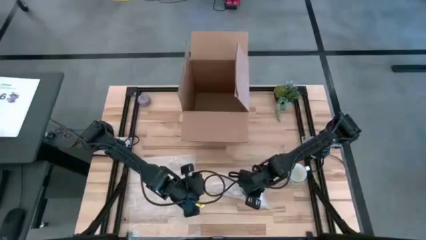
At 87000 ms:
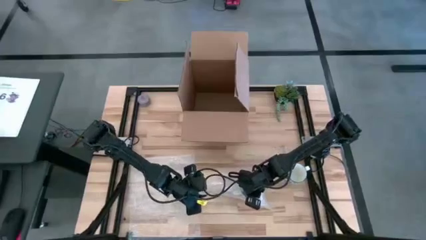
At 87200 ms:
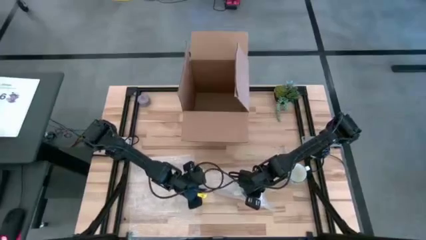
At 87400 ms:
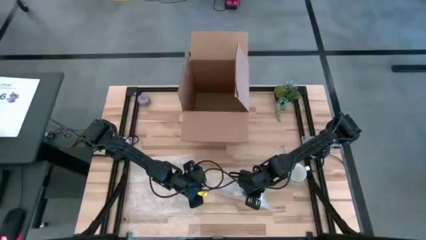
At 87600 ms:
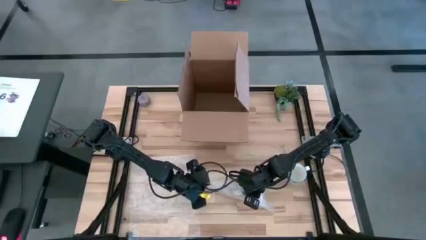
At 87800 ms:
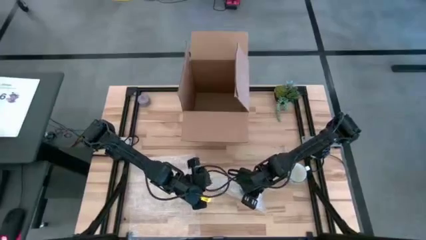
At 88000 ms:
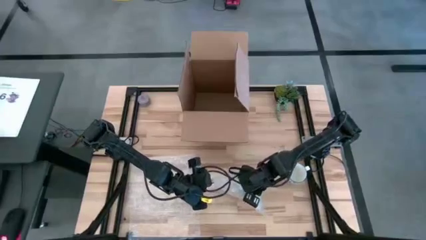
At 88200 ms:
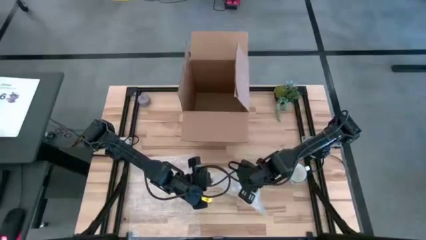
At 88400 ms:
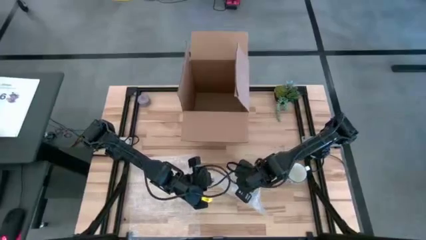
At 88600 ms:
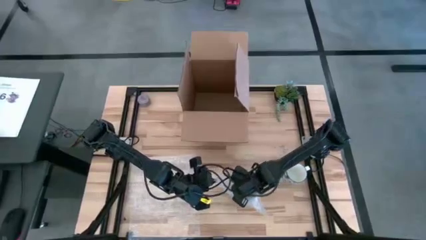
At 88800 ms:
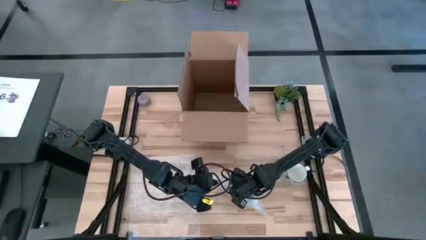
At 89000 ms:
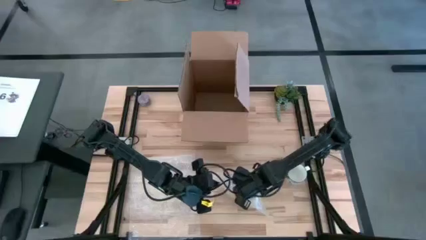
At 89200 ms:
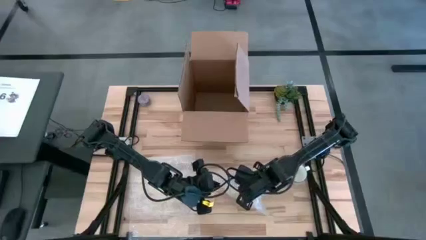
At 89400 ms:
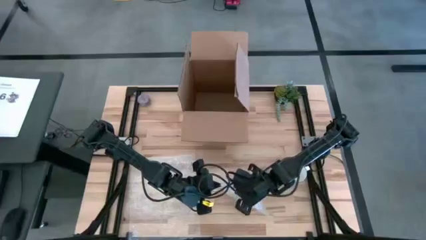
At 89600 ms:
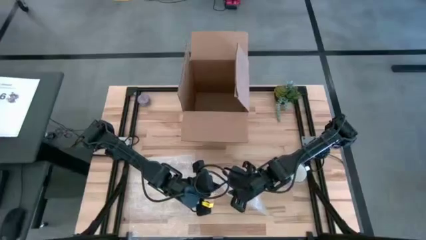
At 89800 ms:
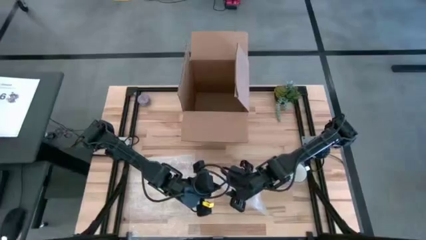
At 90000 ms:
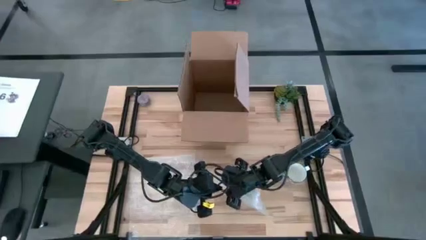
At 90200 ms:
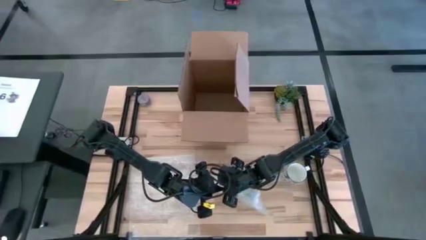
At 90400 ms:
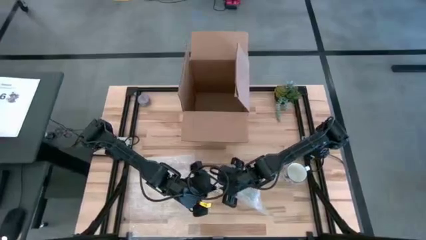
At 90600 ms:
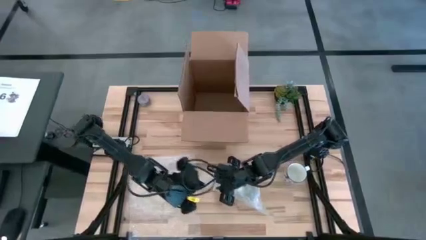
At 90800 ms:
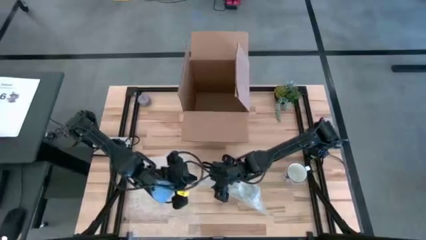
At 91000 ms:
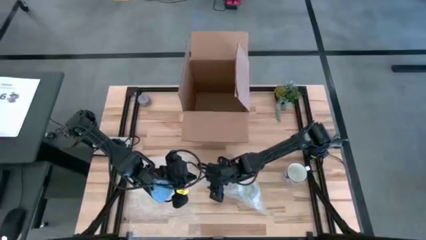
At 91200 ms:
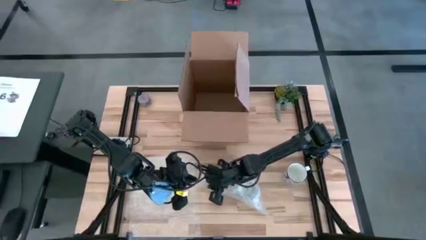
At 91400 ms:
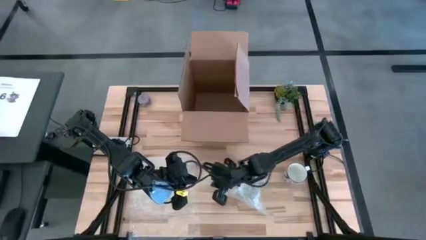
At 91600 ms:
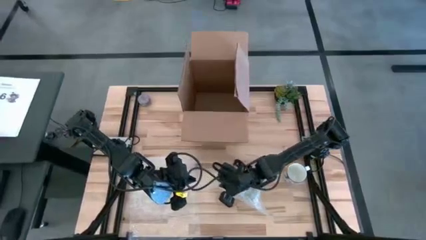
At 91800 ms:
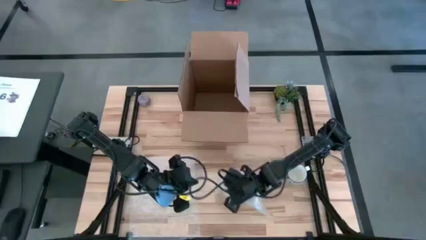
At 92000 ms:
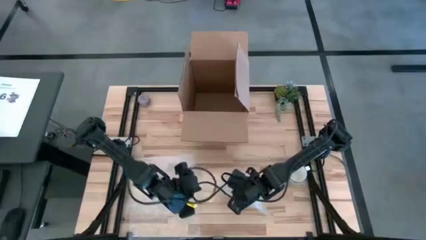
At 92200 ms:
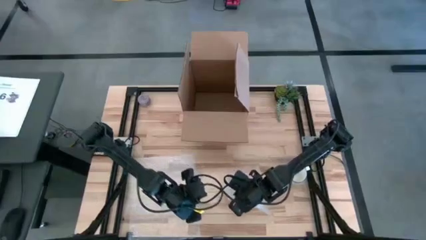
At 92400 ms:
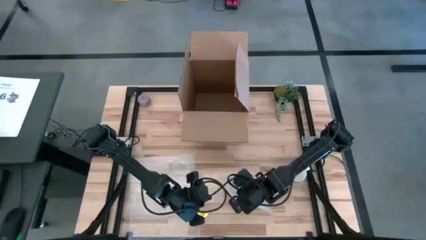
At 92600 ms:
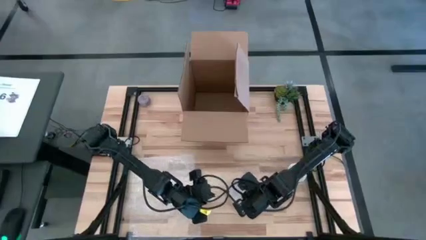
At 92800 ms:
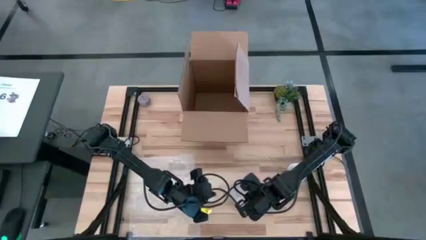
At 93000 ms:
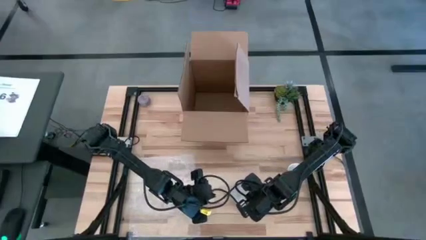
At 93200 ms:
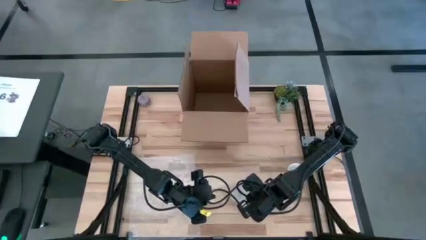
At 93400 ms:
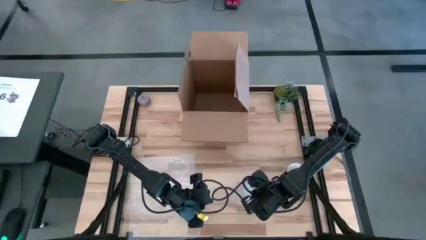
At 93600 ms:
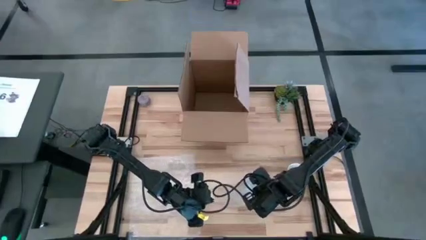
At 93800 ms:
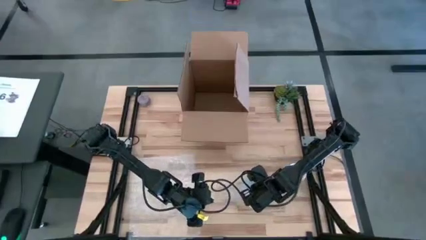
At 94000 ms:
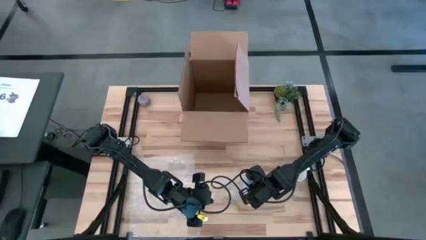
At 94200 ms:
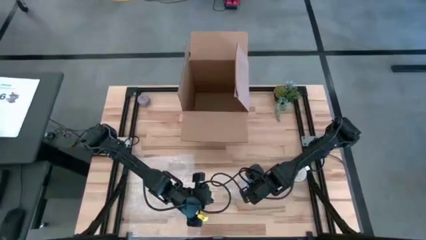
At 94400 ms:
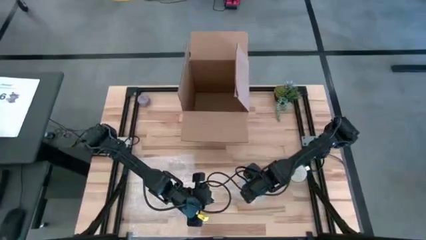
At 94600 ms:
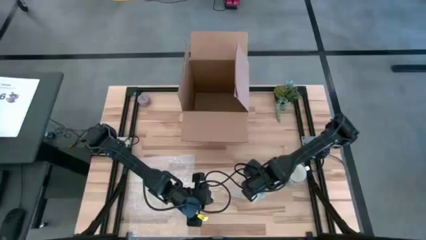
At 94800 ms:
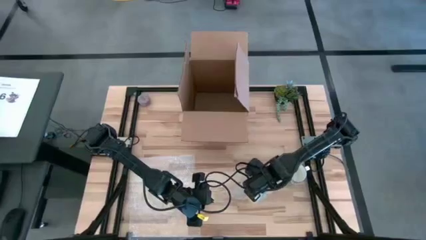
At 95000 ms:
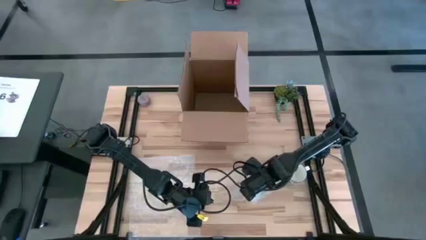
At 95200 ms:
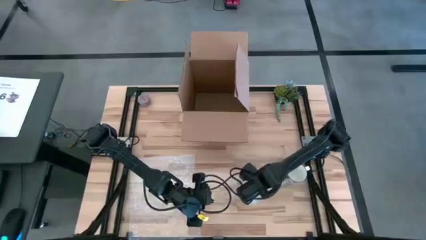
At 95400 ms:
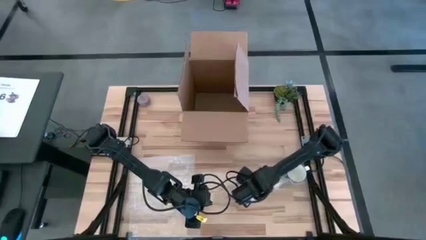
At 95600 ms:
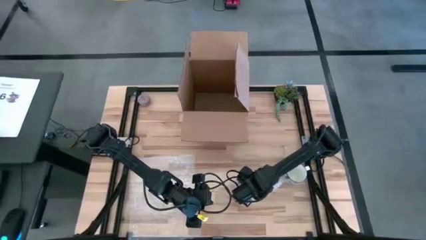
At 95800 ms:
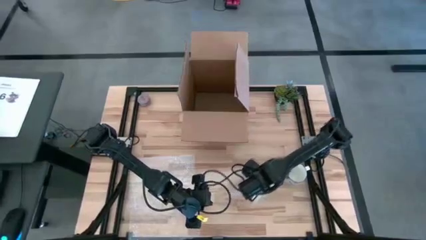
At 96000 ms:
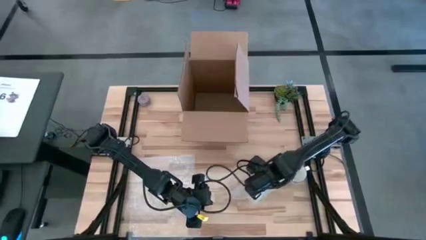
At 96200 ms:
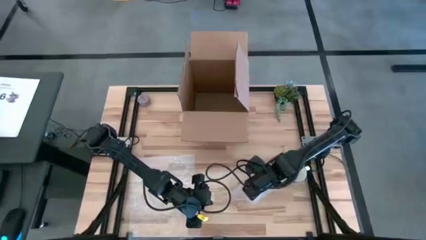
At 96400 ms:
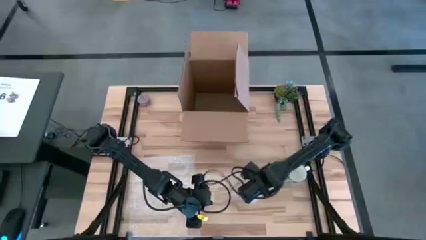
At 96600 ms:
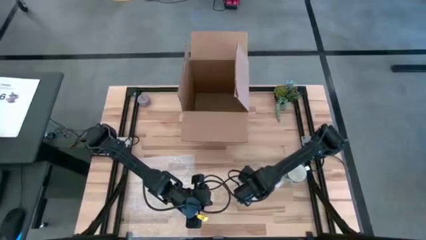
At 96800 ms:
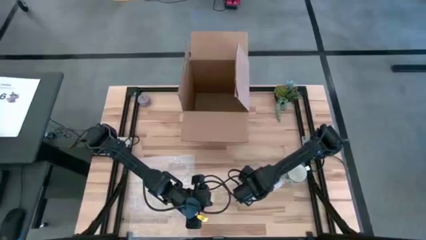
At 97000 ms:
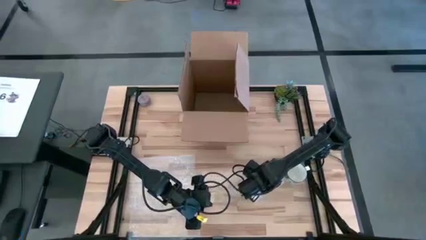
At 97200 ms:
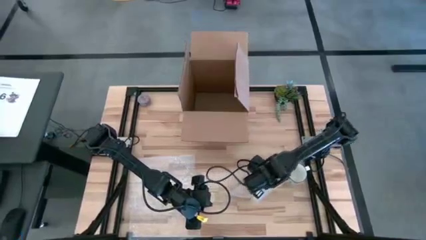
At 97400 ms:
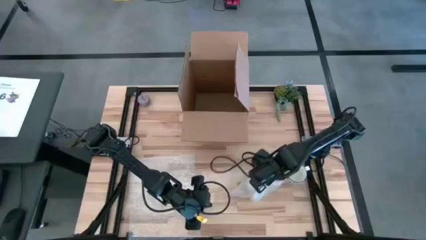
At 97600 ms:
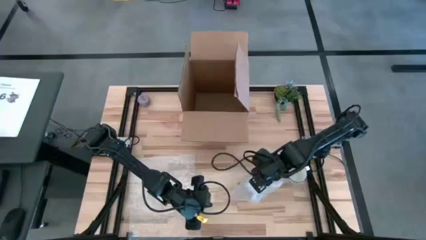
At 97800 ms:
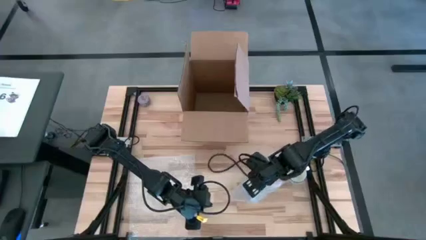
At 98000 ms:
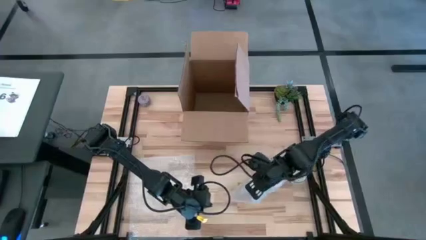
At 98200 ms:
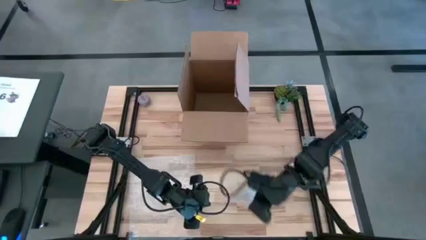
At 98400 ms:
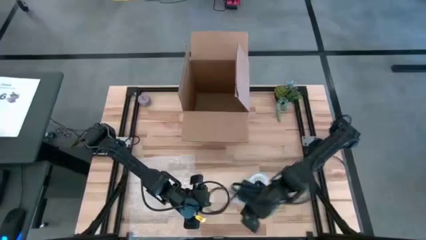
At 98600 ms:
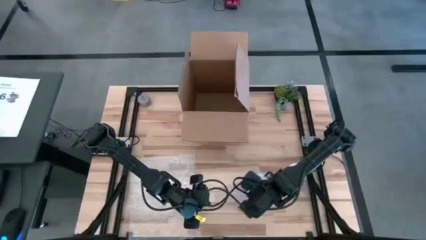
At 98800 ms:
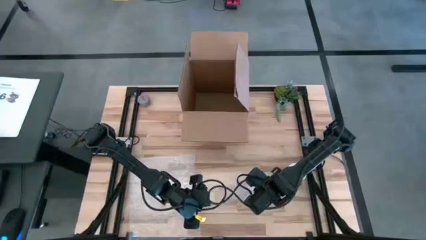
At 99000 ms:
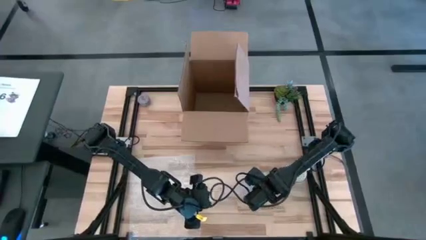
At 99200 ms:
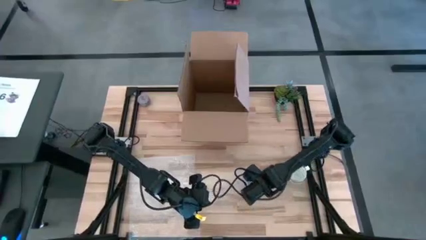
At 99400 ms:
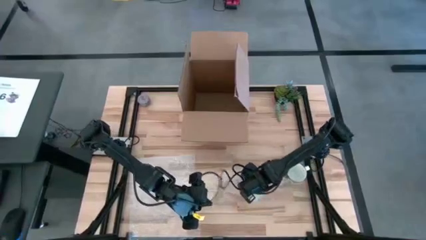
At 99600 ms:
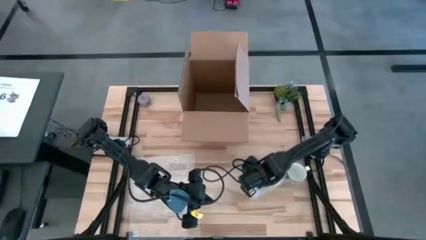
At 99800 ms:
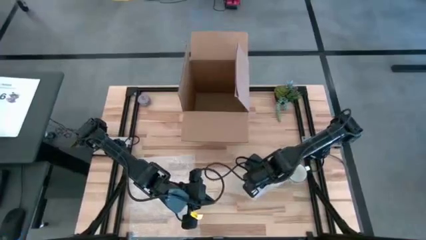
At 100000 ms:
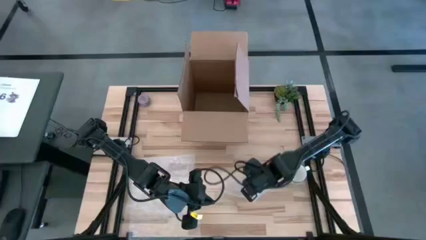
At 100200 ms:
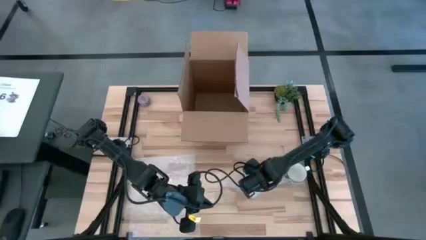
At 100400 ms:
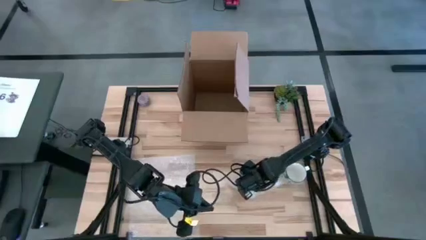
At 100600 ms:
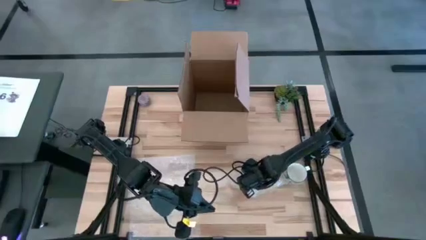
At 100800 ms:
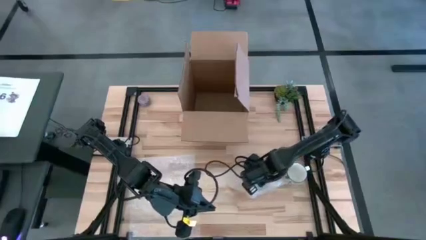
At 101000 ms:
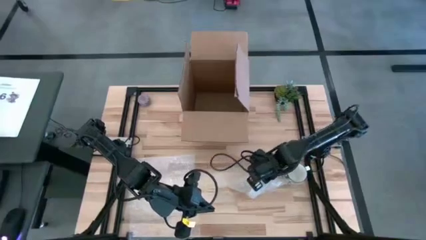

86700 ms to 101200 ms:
Task: wrap mug
Wrap the blue patterned mug with the right transparent bubble wrap

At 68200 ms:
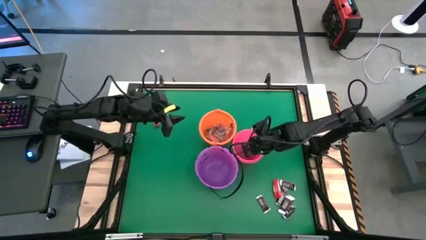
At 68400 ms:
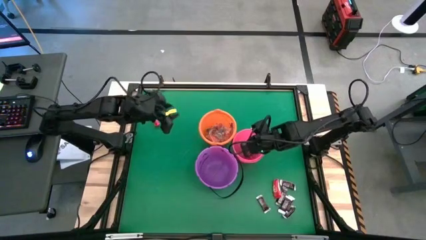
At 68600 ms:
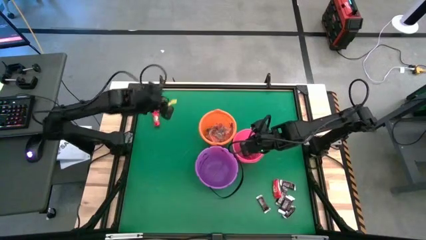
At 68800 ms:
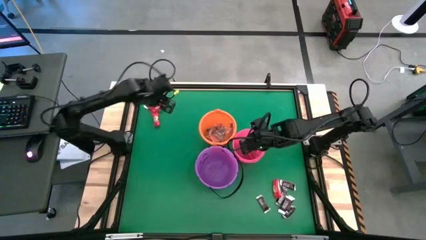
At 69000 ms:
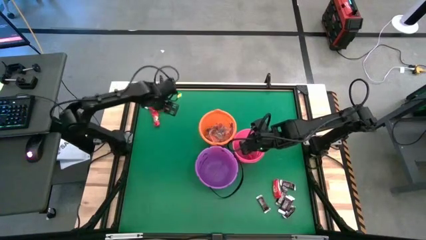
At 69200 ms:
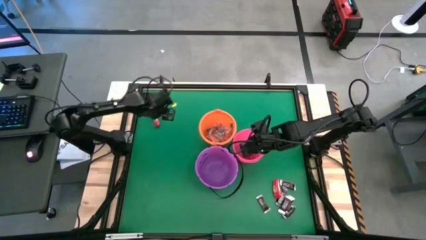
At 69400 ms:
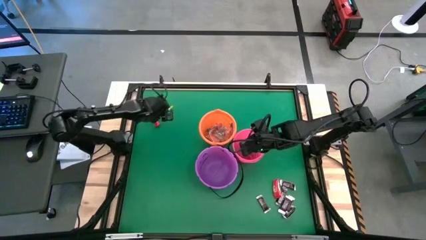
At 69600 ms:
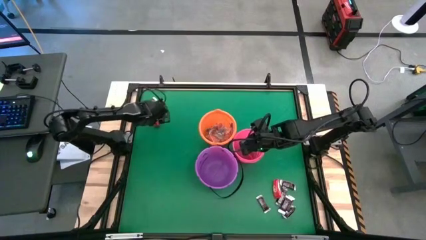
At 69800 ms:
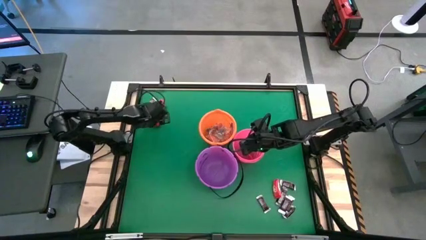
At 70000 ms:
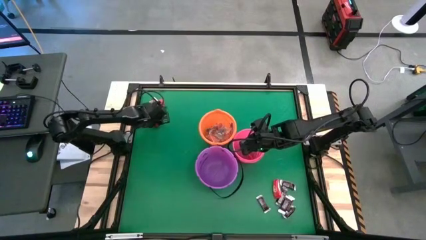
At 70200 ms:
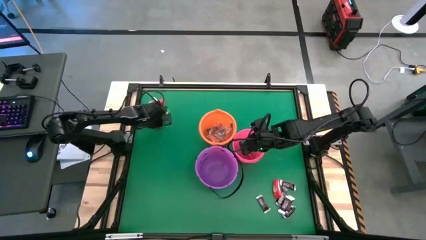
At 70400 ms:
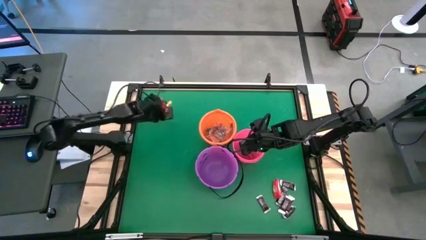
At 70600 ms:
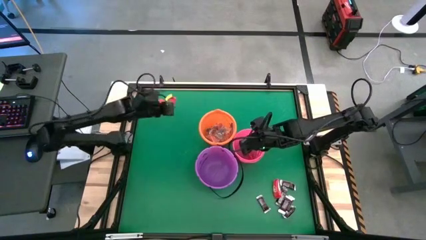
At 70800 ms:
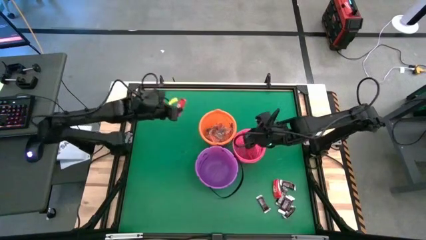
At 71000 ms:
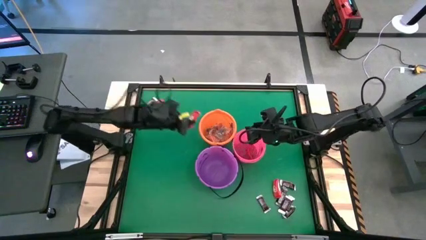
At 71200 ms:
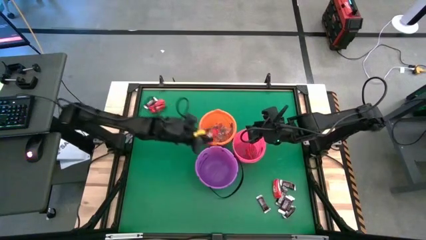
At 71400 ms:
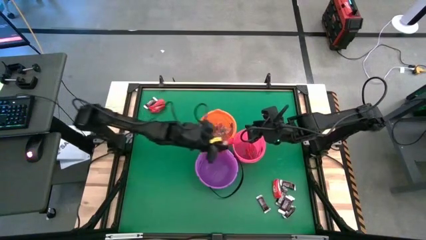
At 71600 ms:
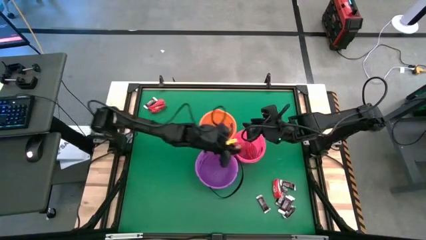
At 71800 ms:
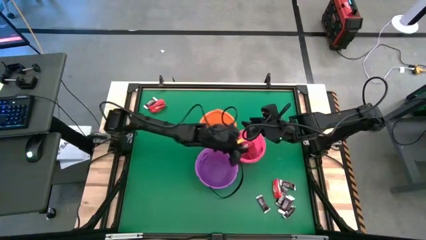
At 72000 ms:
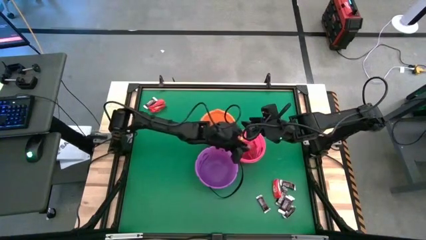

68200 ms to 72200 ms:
Task: Sort candy by brand, put in halloween buckets
Put the red chocolate bar into the pink bucket
